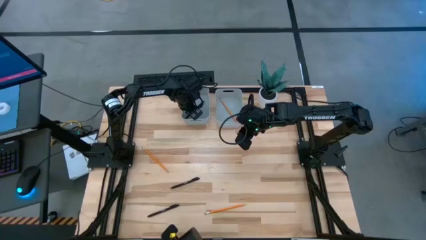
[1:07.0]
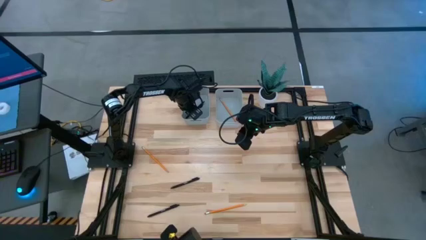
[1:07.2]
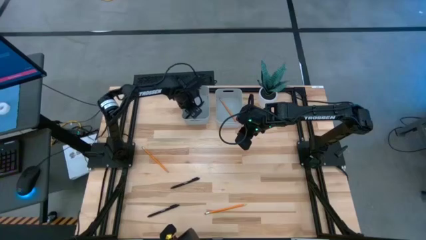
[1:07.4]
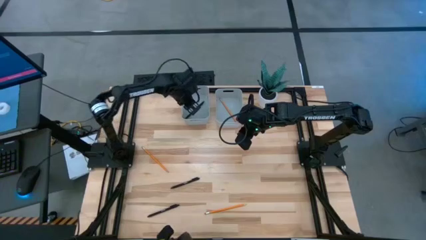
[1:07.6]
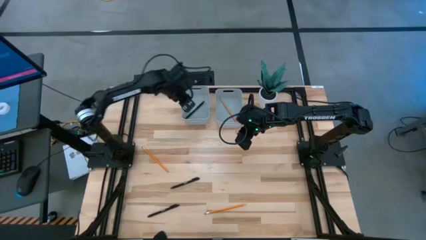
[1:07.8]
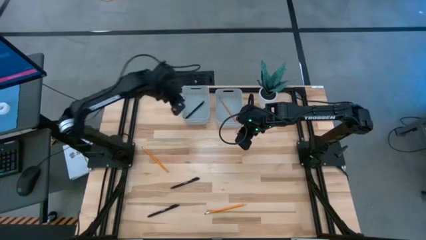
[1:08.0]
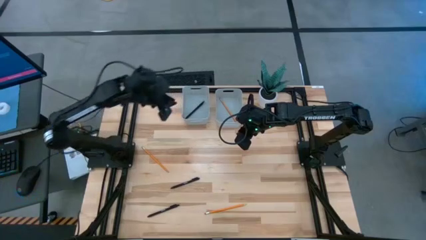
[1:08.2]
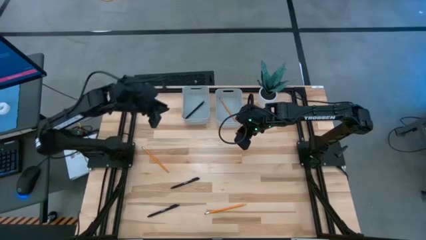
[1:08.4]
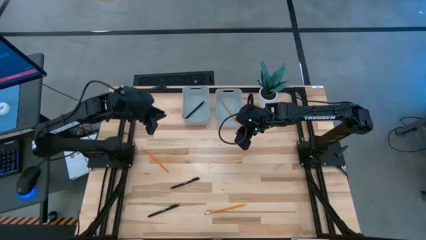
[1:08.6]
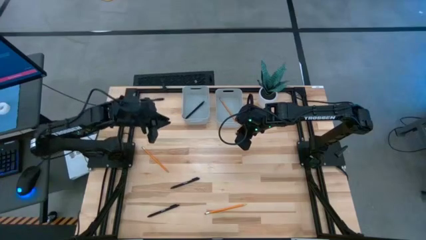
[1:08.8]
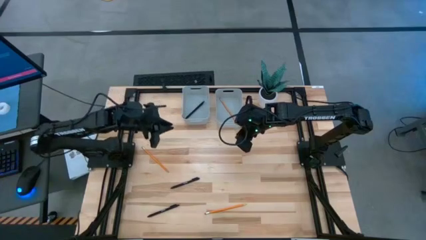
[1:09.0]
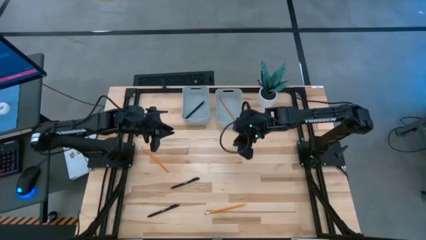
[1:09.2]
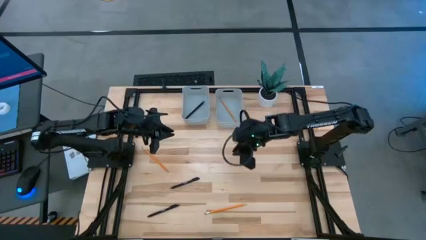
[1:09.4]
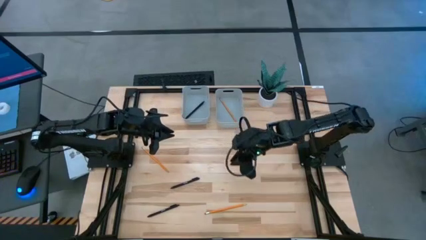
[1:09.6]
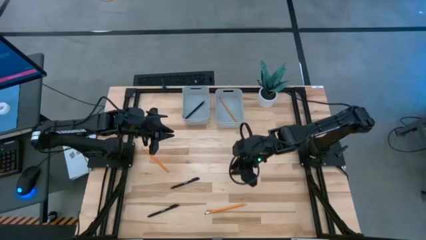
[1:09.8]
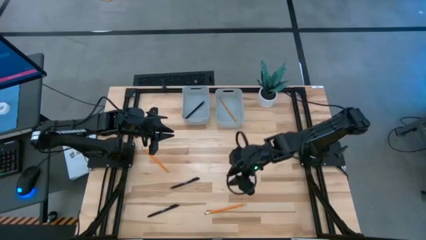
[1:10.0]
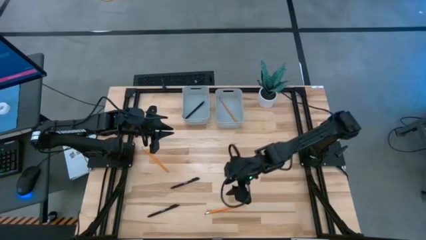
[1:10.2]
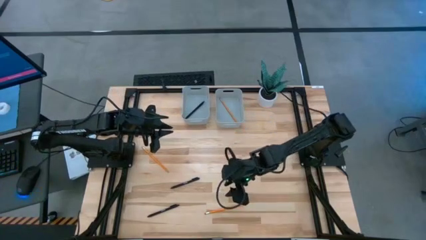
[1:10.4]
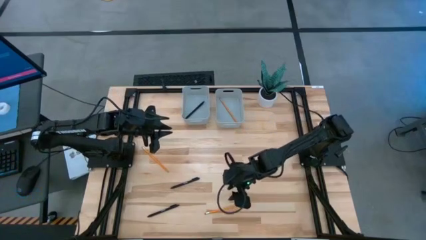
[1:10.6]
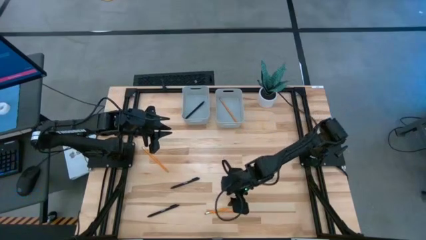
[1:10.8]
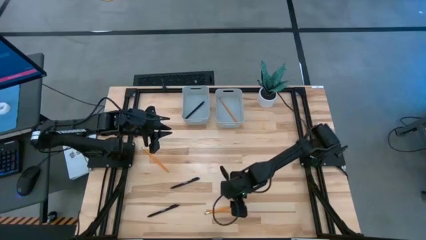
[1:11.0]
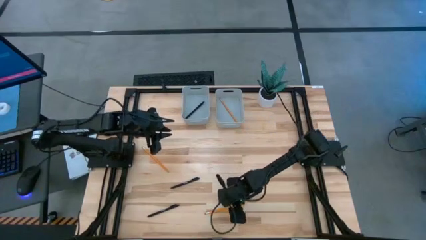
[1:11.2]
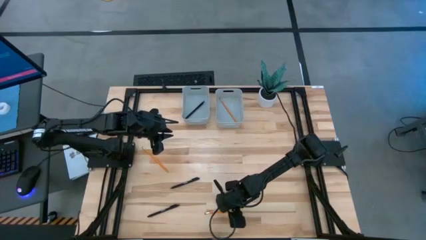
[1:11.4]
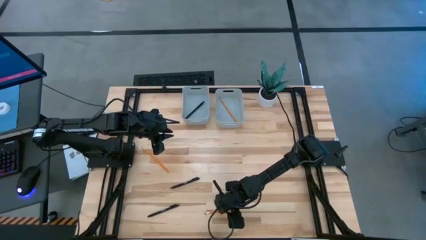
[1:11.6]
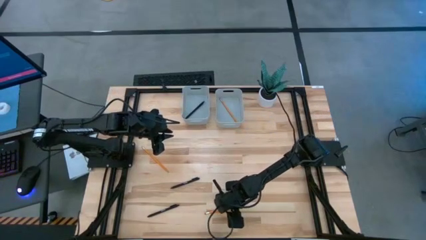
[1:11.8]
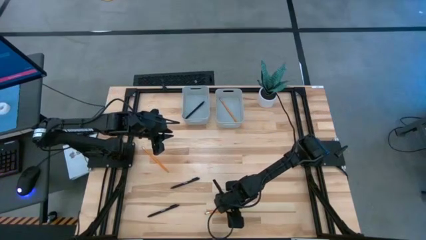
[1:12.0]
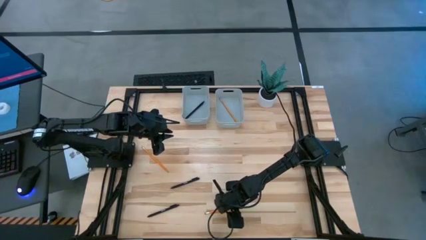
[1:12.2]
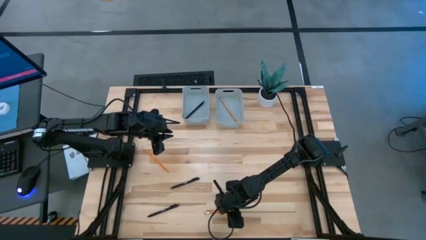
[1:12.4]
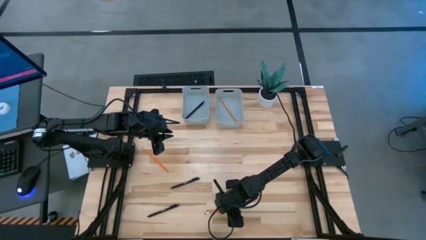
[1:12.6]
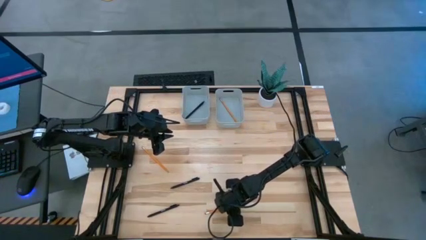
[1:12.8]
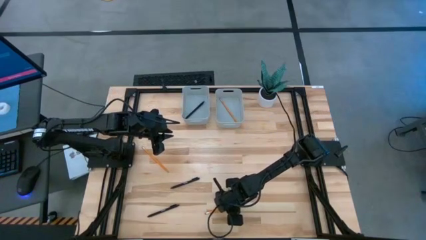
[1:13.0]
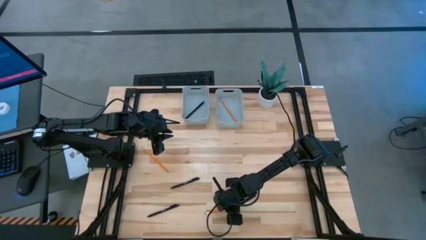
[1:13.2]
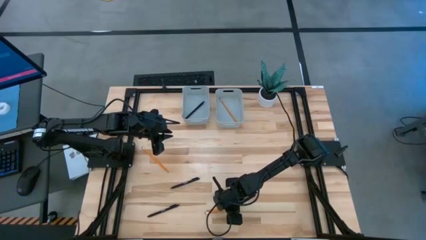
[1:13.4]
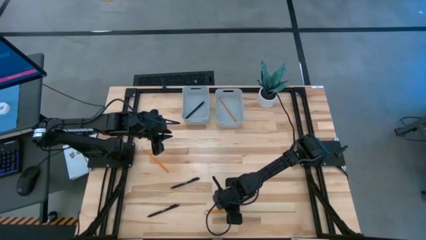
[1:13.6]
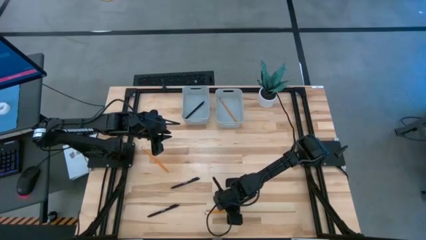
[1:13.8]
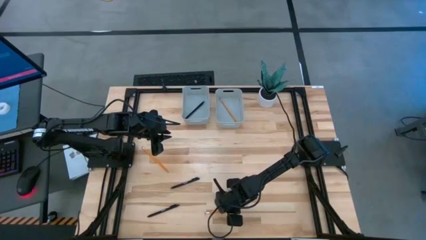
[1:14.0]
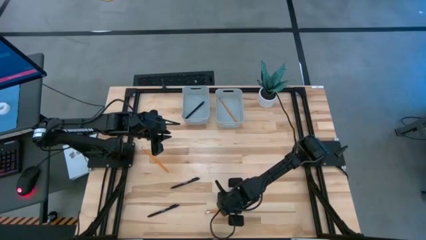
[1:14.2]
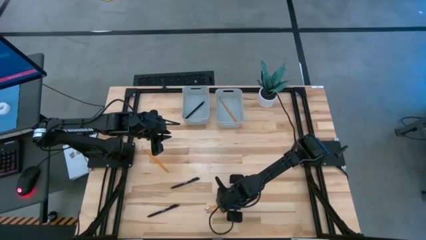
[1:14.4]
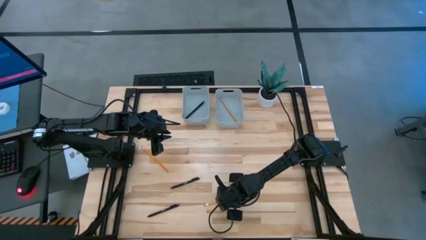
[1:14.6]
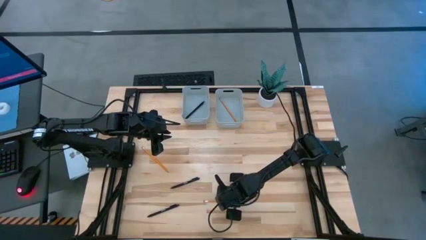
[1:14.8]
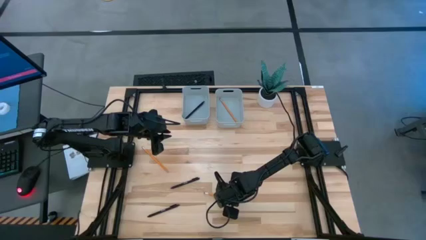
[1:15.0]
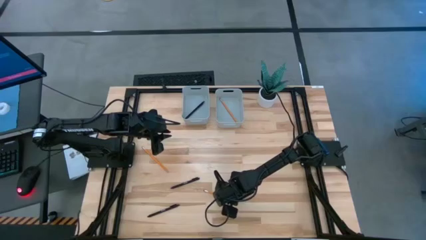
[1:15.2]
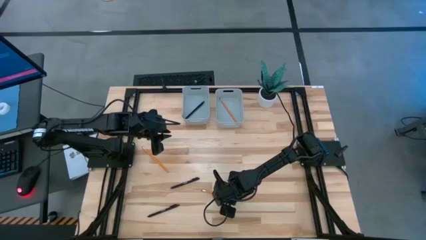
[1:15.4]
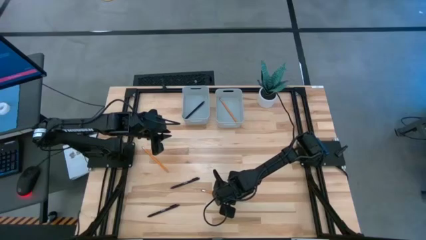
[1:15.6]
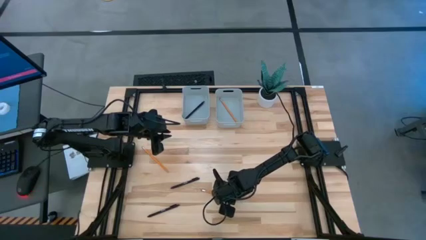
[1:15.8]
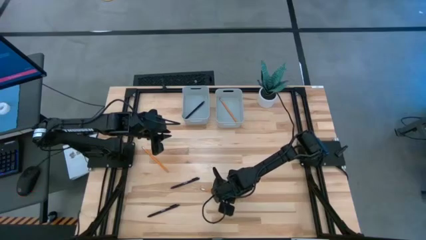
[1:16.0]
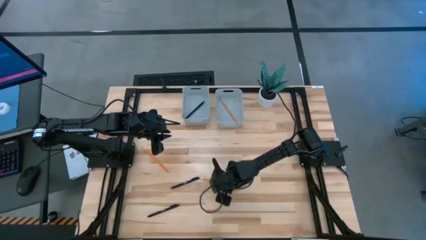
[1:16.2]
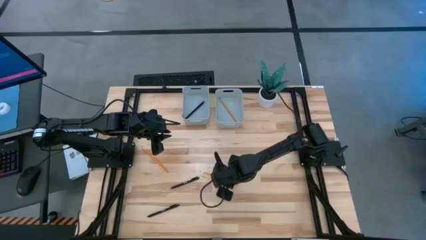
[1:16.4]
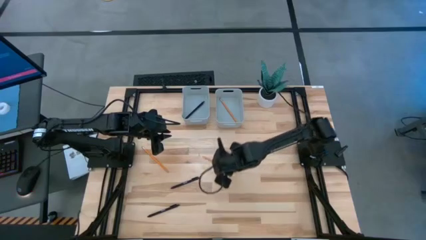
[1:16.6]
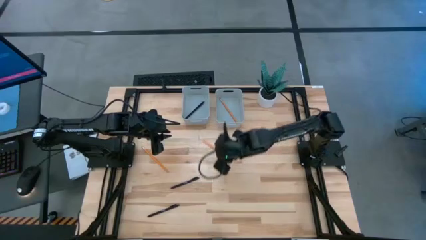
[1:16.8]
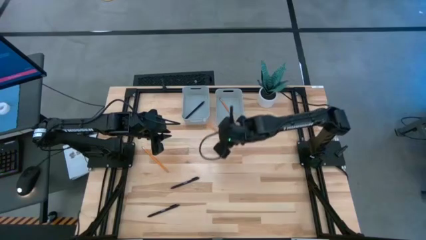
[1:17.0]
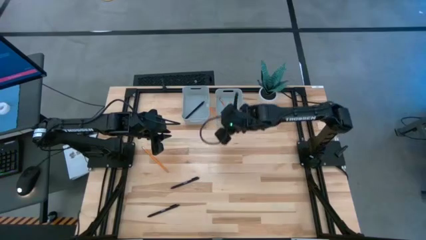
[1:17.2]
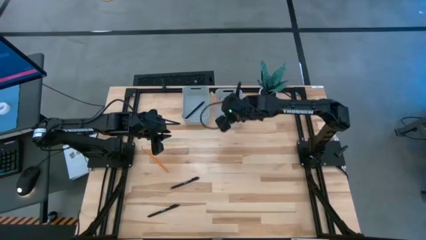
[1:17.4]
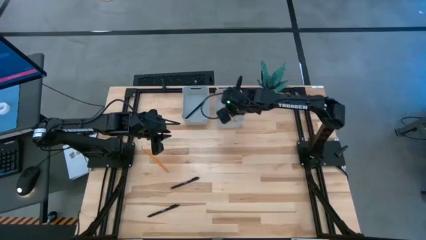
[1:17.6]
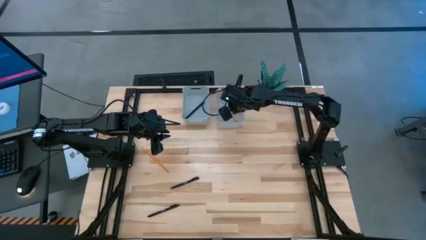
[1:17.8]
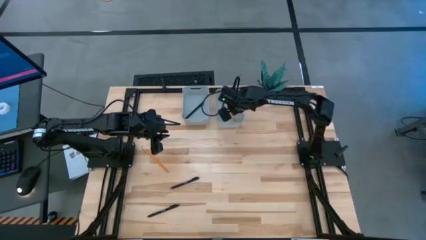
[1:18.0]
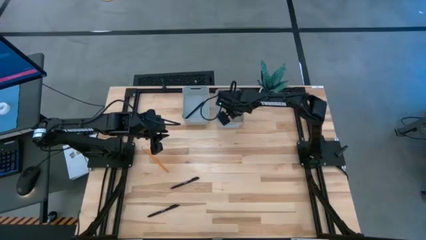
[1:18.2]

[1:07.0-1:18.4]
Task: Sort pens & pencils
Put the bottom orange pencil into the right gray bin

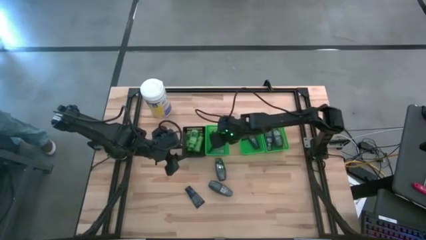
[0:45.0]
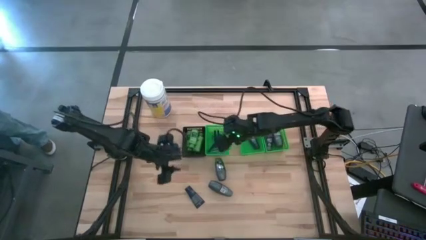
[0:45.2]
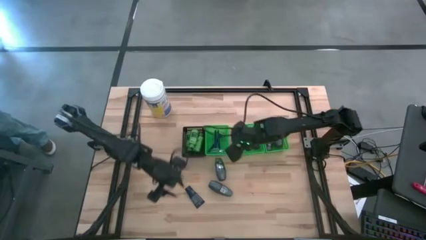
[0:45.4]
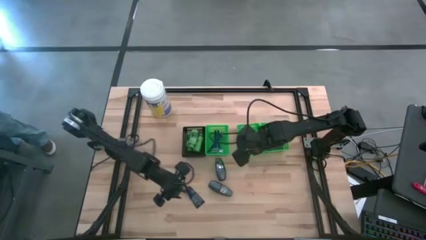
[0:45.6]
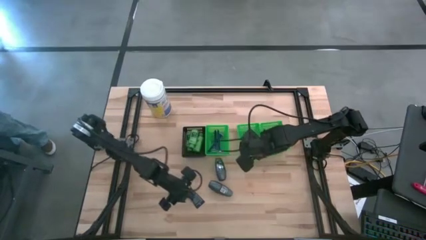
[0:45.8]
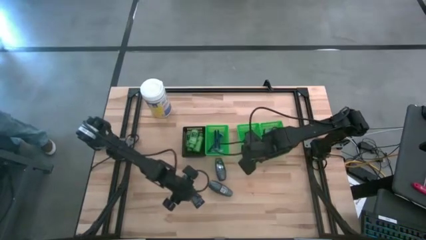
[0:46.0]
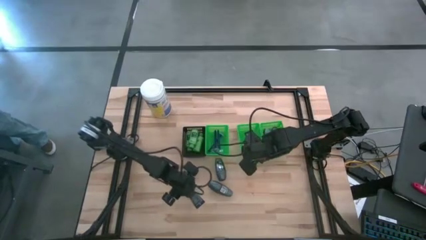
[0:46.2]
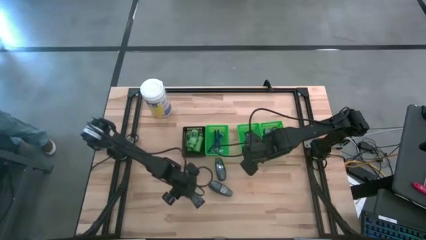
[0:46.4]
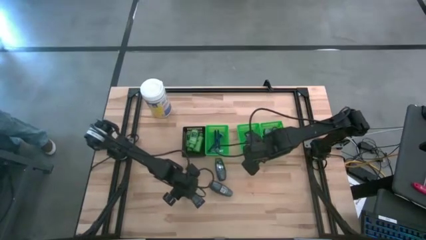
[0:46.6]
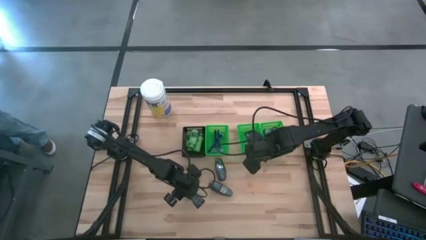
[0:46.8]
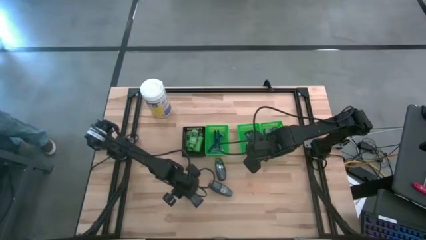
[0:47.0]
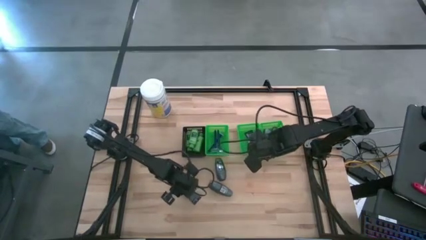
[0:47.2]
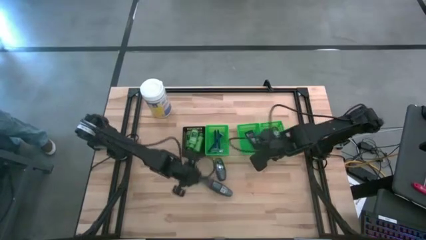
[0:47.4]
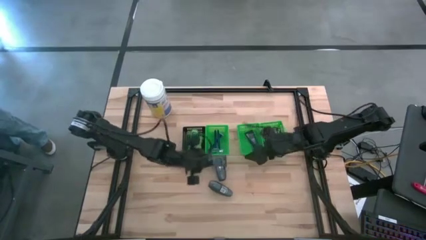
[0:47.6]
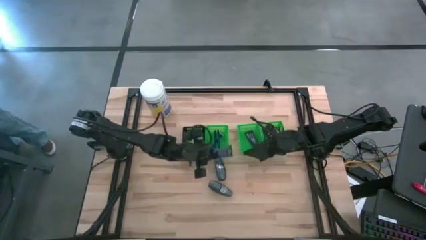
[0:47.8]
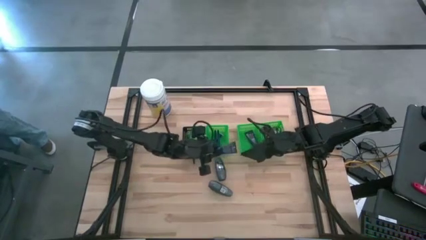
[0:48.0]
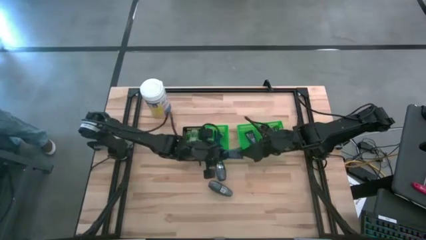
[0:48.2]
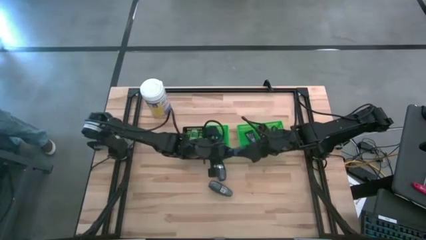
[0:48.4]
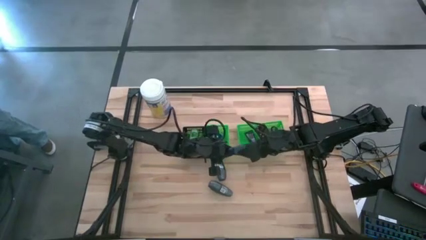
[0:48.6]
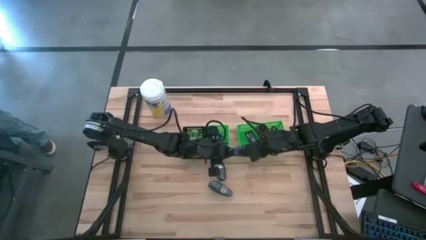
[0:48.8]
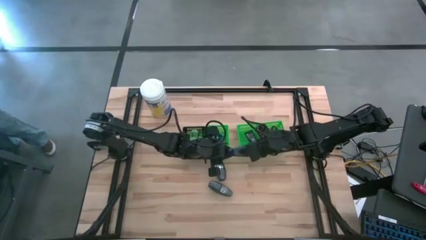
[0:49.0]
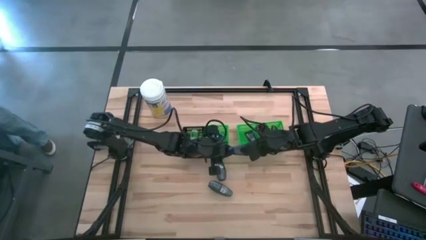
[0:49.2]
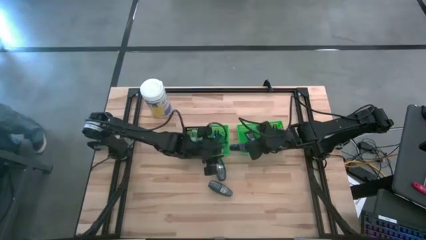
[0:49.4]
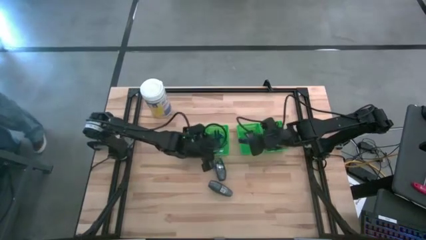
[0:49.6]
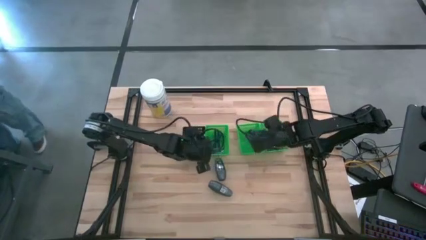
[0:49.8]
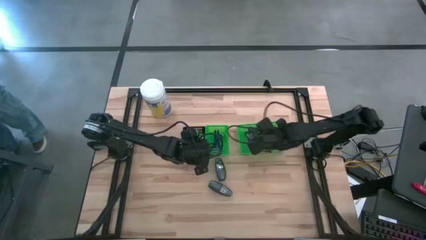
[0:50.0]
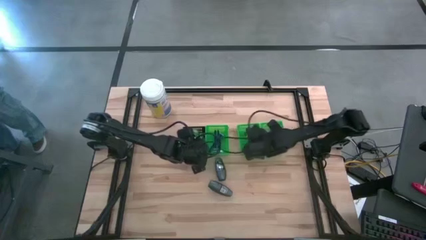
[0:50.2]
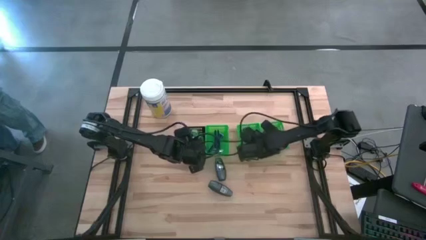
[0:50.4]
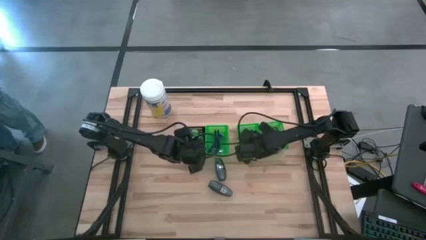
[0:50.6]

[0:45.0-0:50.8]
Task: Pick & Place Travel size toiletries
Put the blue shave cream into the middle green bin
